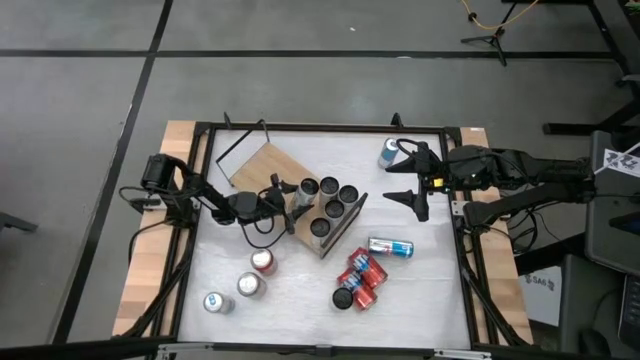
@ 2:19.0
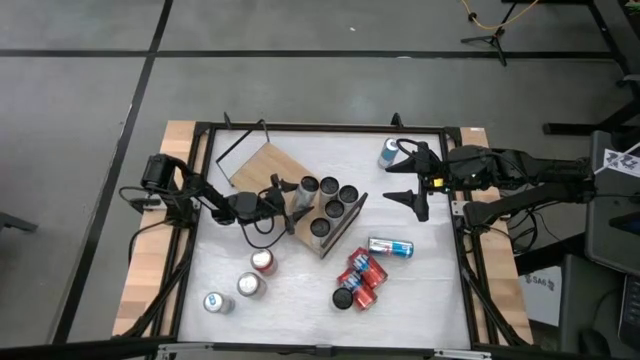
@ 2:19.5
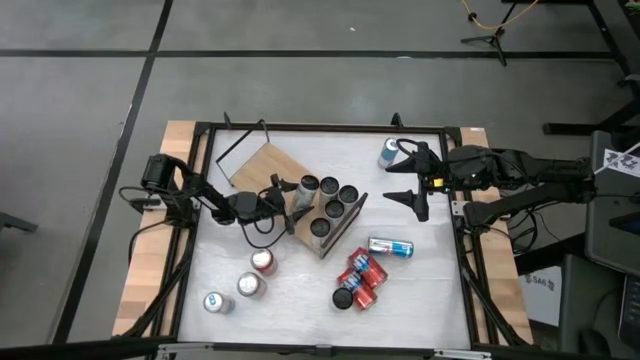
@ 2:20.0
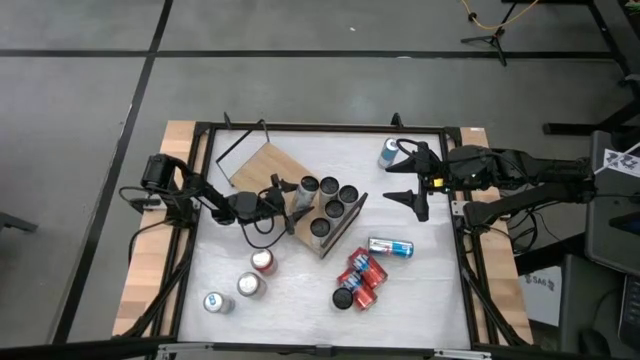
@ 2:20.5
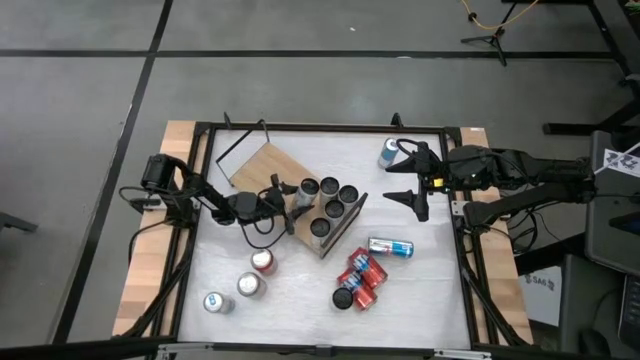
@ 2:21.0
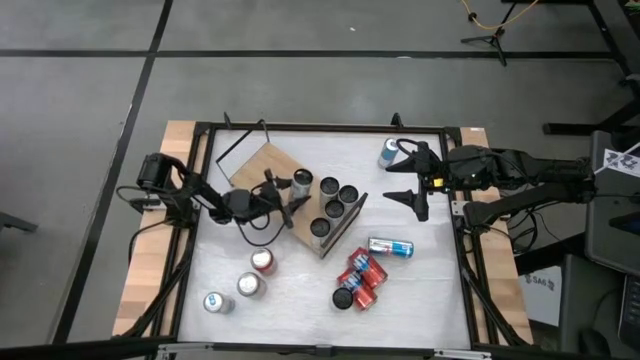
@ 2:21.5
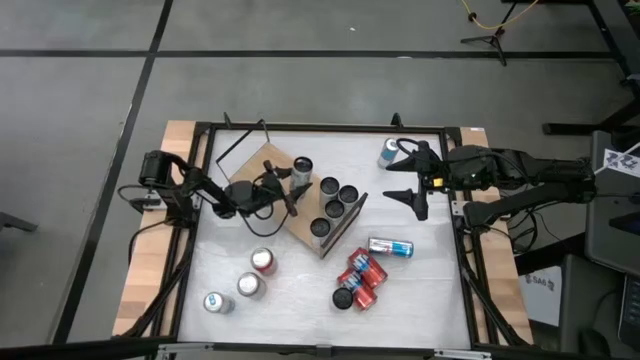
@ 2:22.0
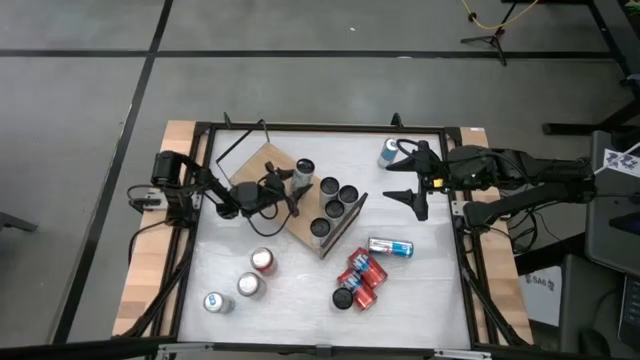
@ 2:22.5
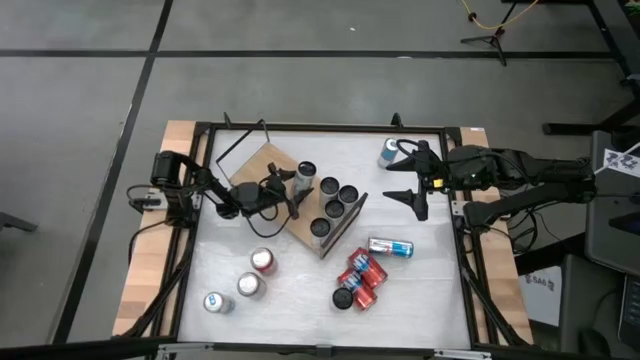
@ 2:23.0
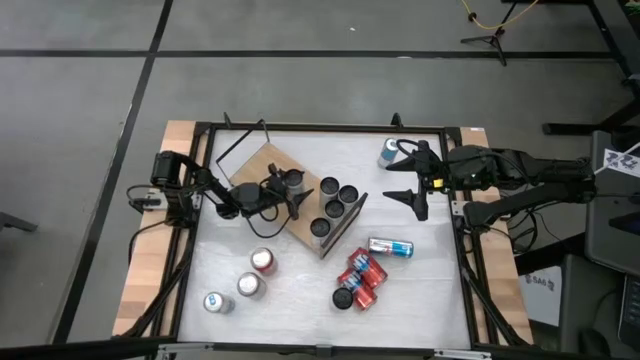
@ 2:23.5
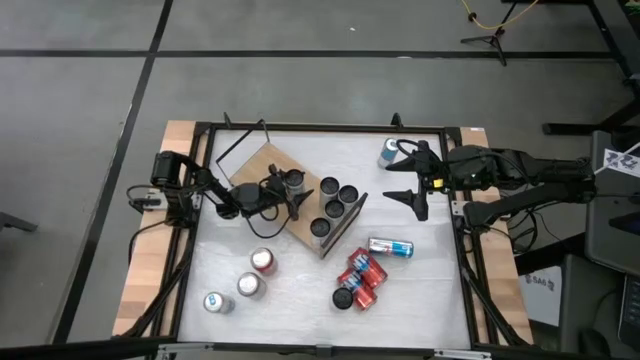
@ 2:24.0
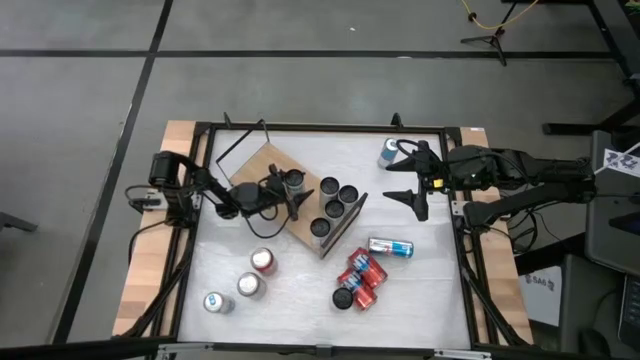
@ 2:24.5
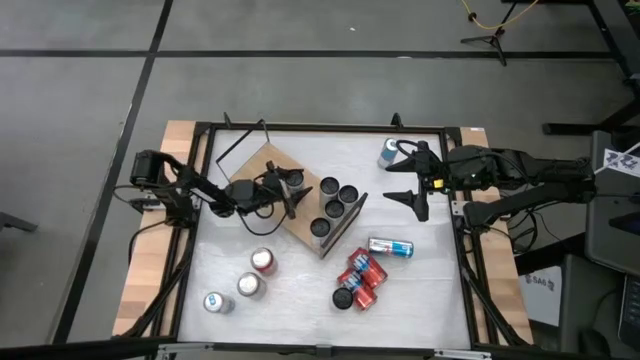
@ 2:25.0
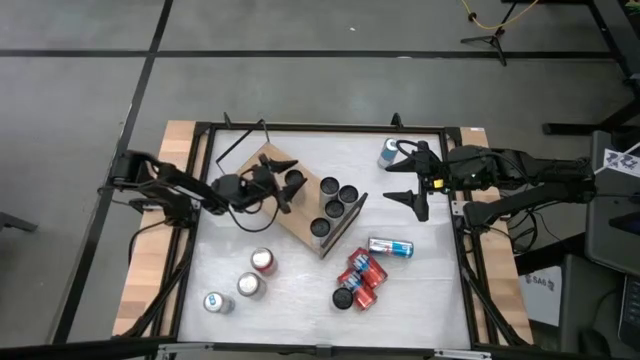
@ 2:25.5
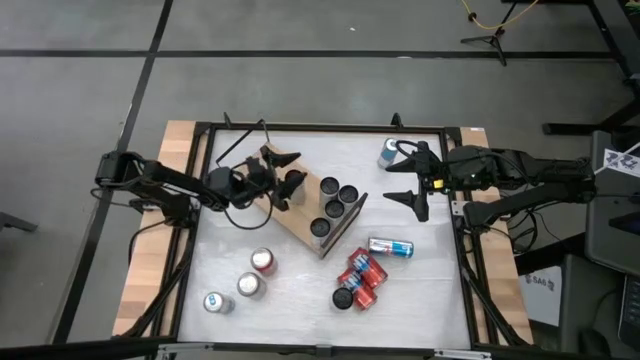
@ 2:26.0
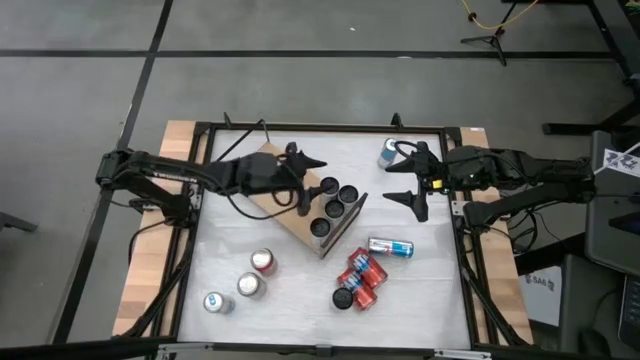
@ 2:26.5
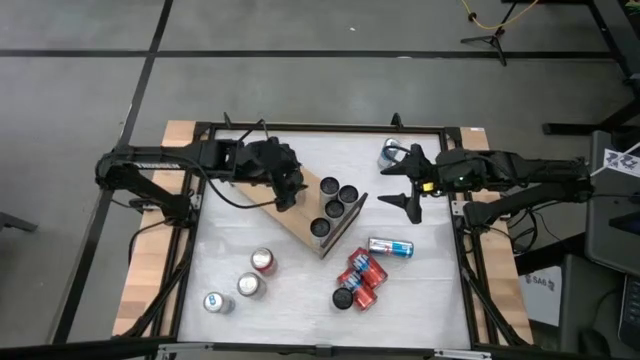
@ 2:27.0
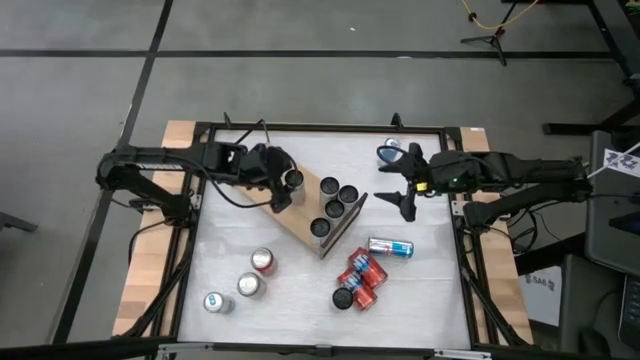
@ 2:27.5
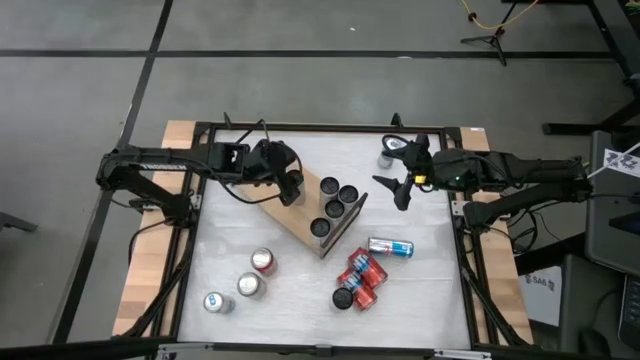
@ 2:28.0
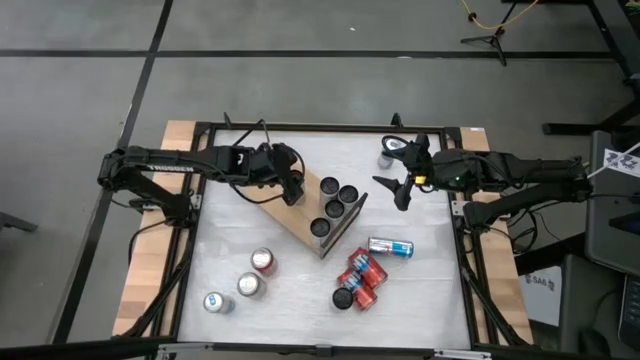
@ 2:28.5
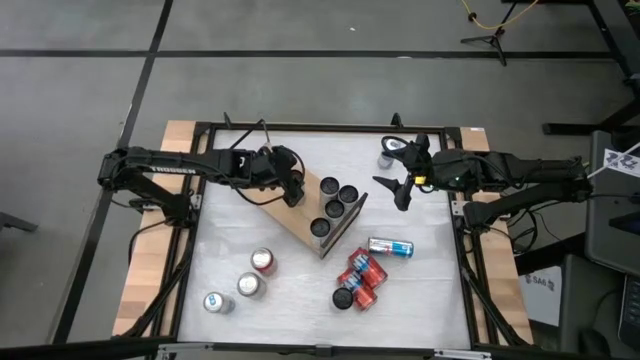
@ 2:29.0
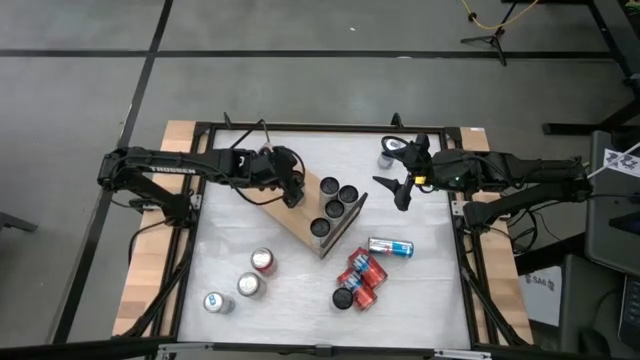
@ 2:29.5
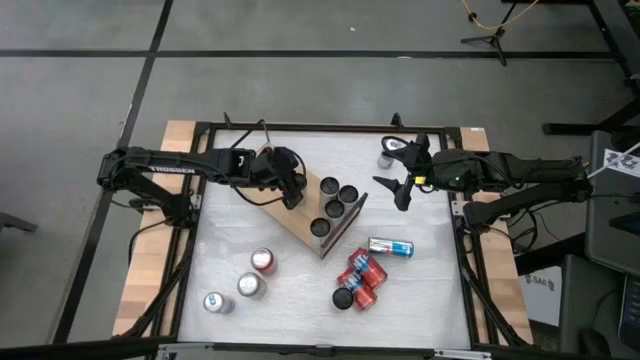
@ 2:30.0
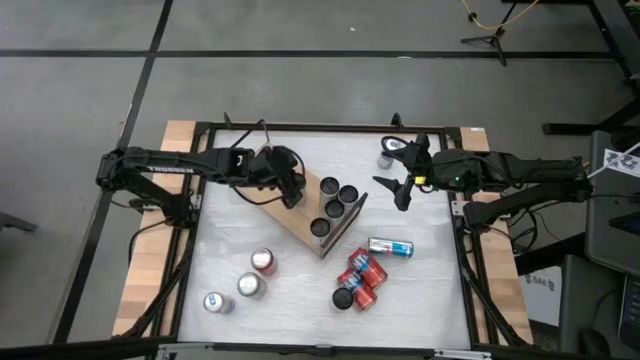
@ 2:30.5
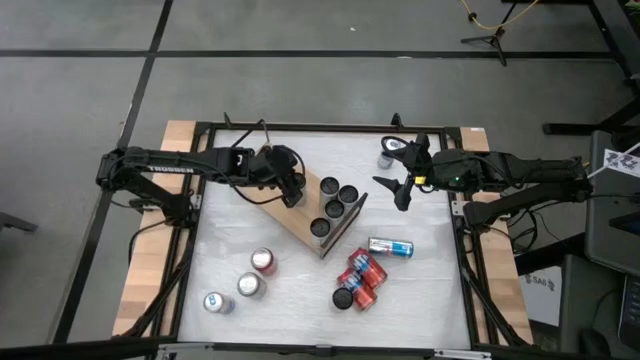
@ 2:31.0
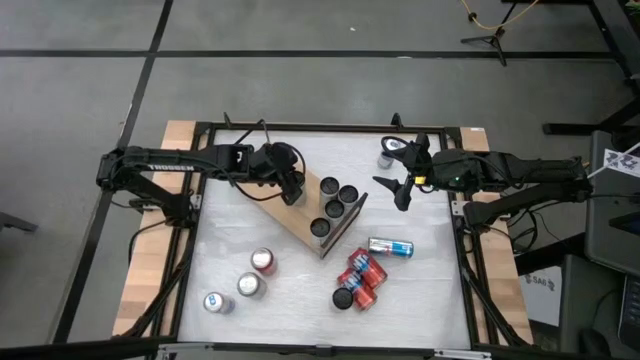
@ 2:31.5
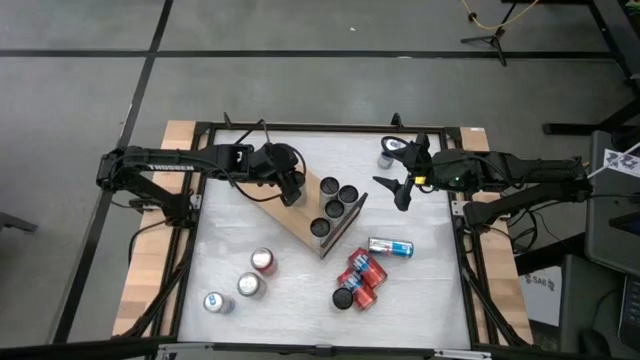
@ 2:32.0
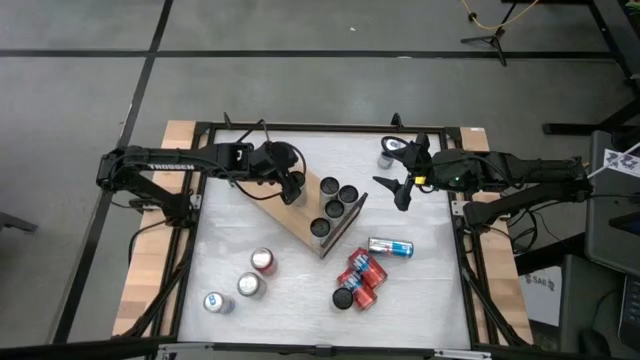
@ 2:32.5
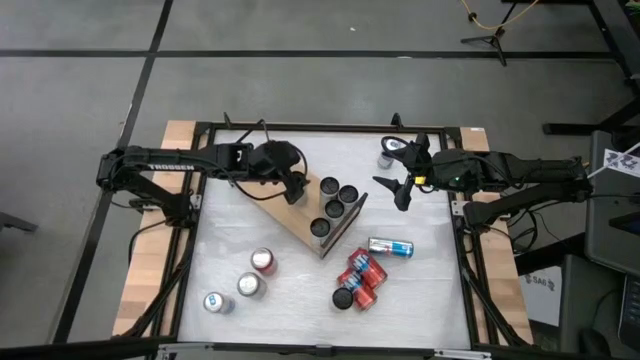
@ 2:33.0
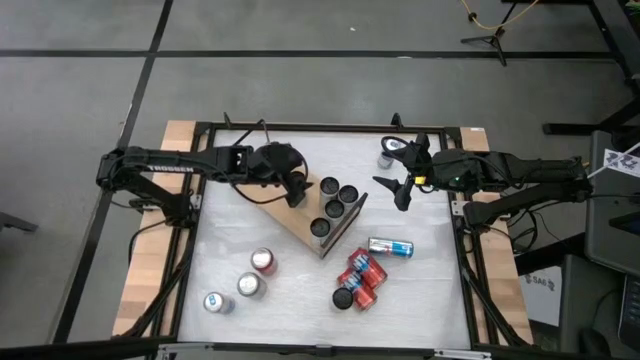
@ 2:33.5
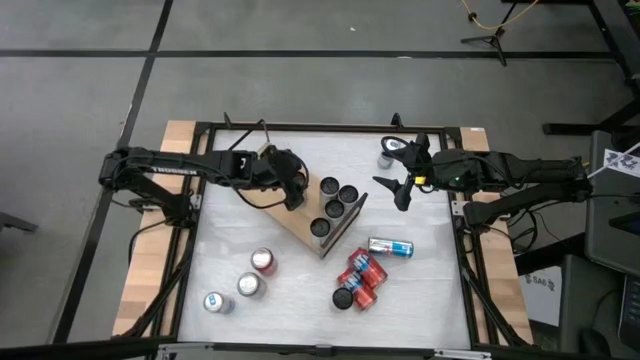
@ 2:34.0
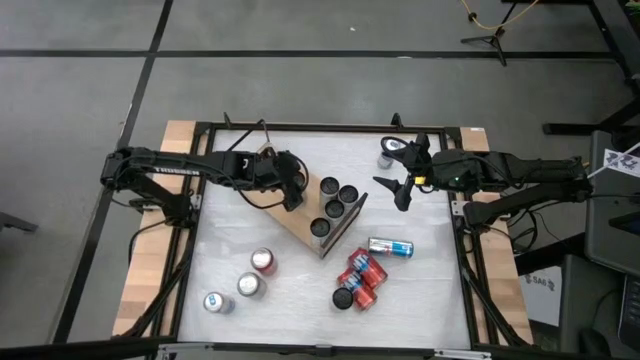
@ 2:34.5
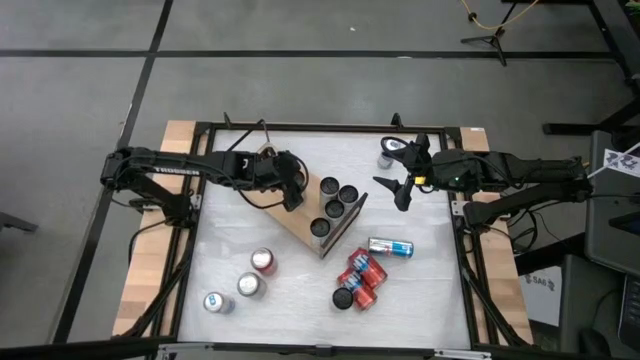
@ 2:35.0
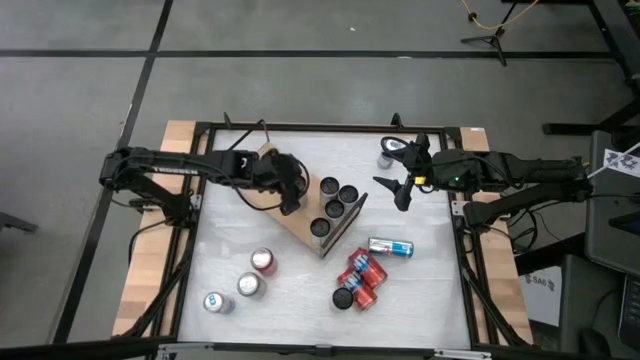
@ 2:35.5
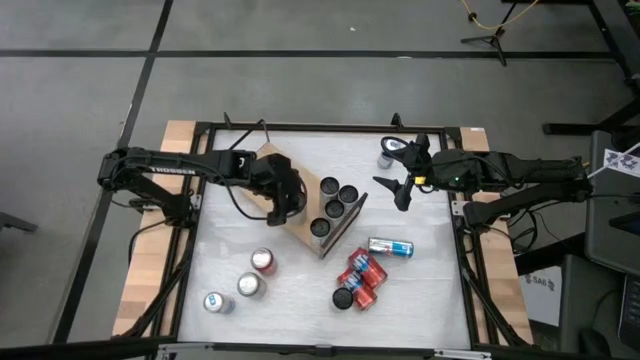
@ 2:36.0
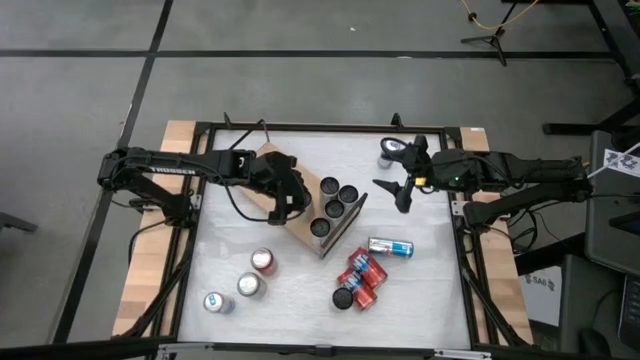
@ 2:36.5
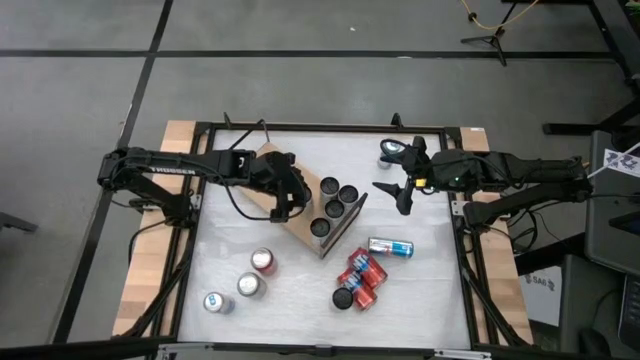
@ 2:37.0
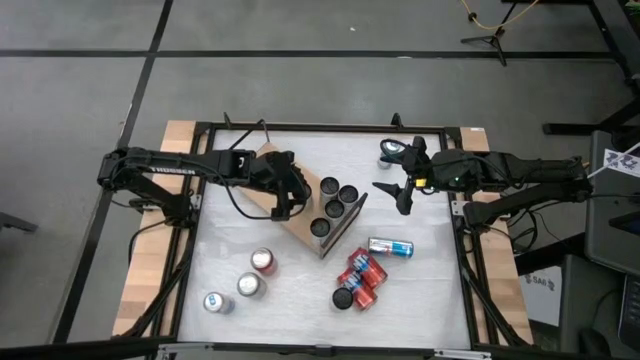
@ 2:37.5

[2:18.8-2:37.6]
Task: Place canned beverage on shelf
Put the top white-yellow soda can on the shelf aligned with the other white-yellow soda can
